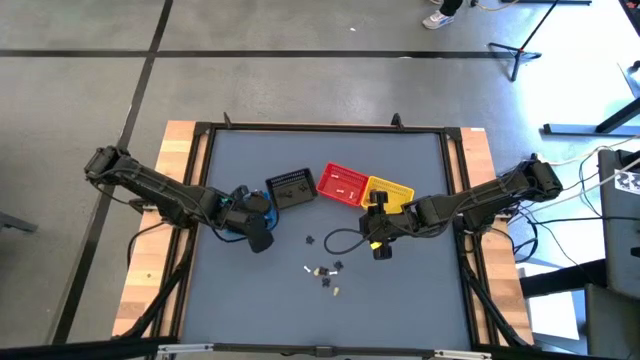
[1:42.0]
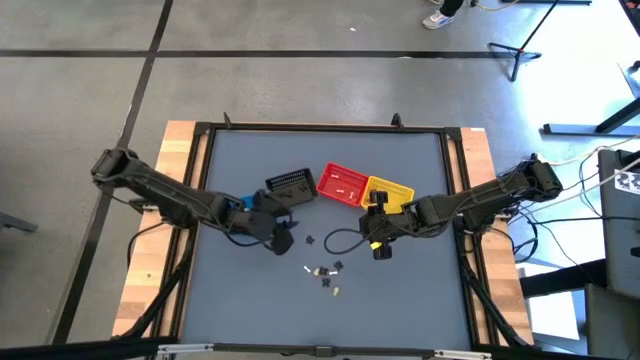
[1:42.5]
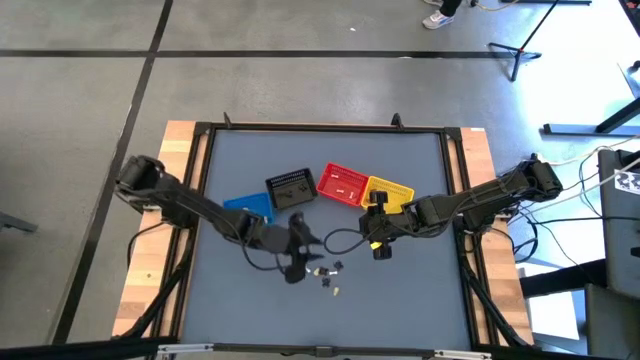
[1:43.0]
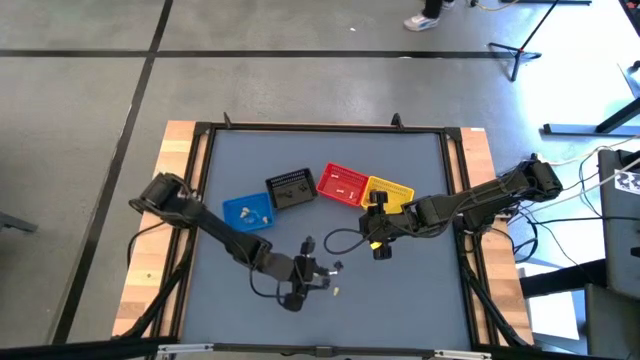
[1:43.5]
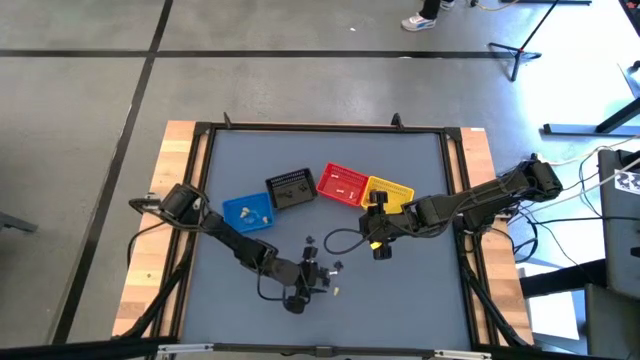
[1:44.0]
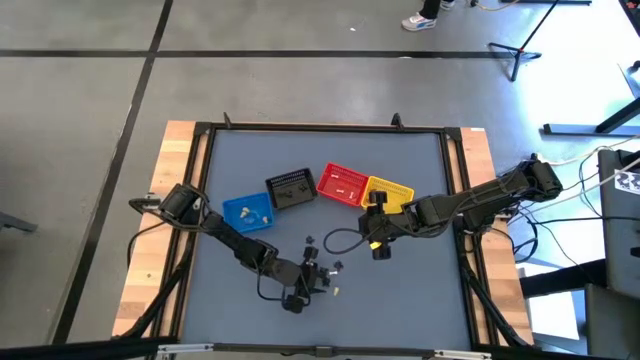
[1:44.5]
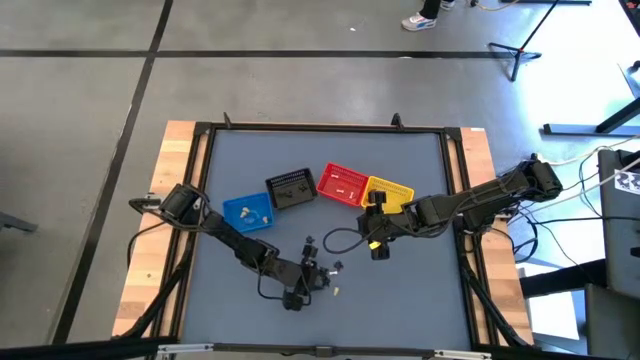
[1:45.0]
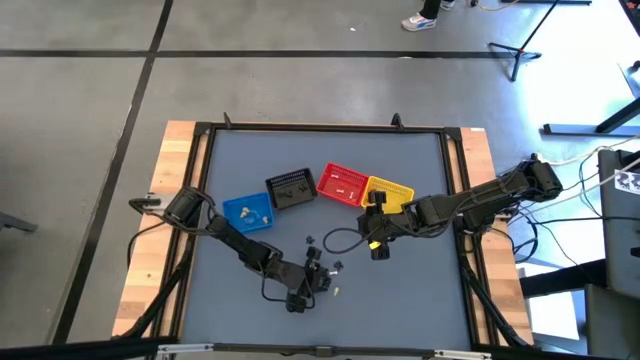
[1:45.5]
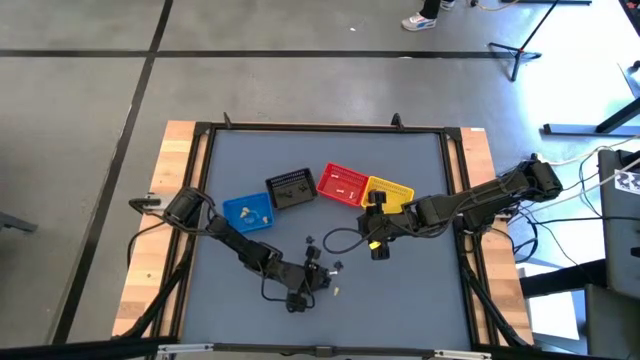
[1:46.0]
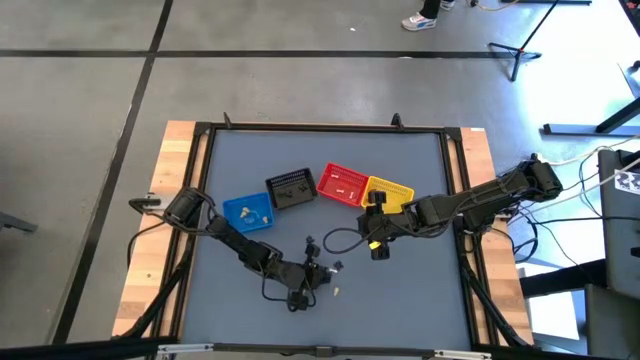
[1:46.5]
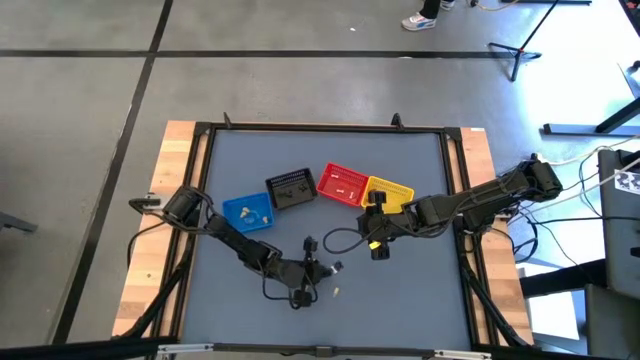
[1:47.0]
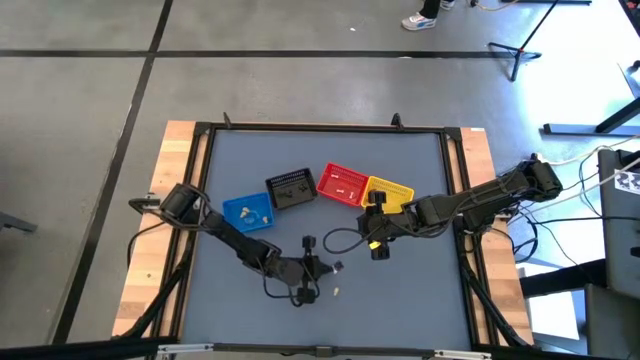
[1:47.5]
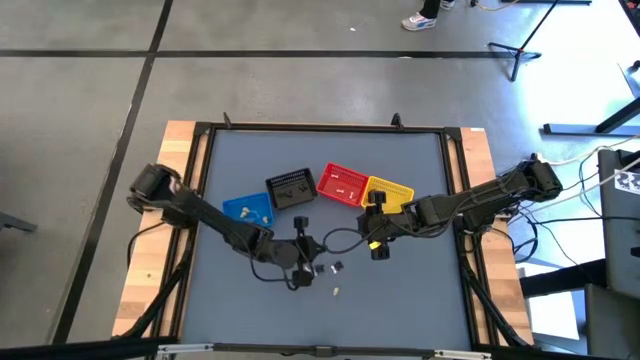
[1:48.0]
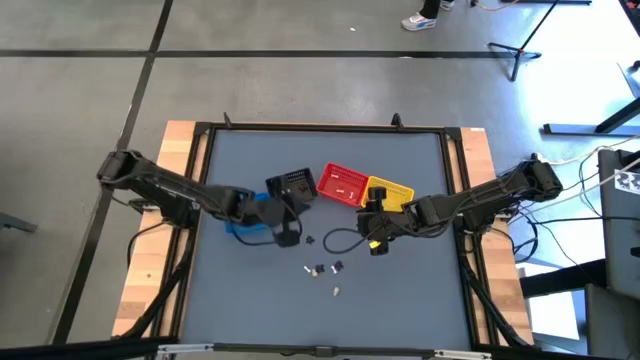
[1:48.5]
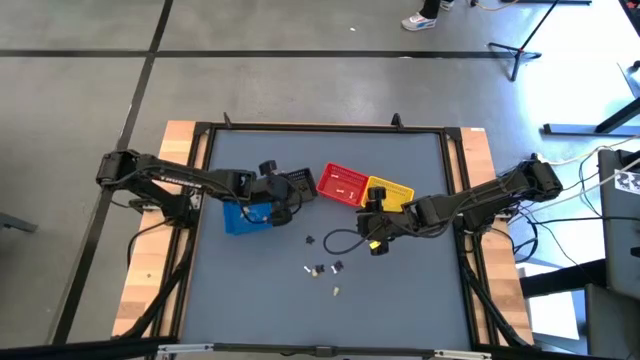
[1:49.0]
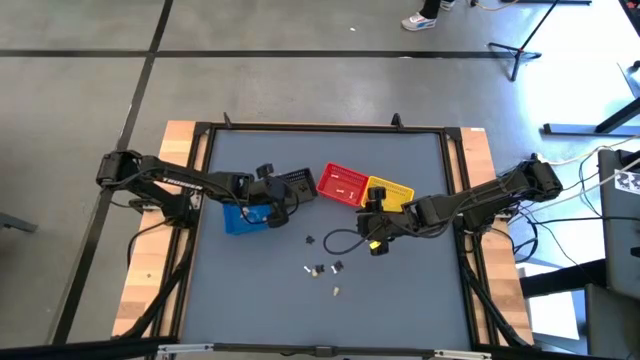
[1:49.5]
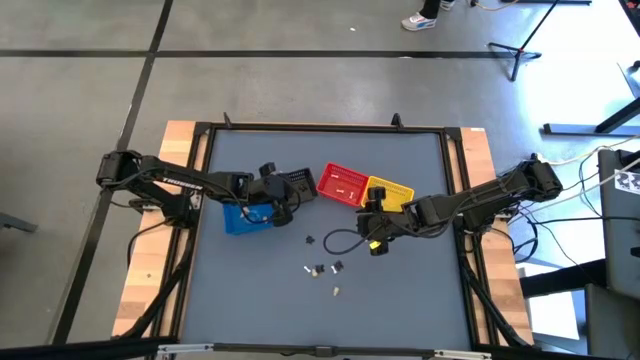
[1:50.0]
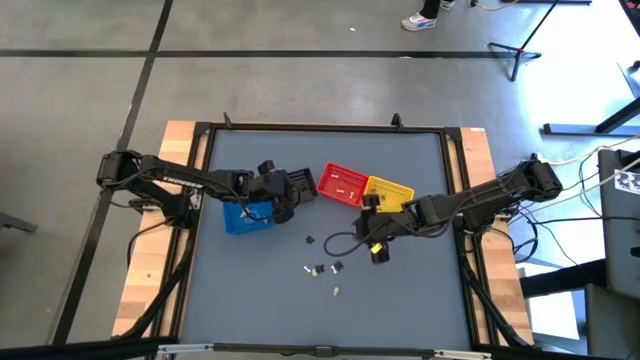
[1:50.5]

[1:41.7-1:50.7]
Task: Sort Halloween decoration
Put the black spider toy into the black bin

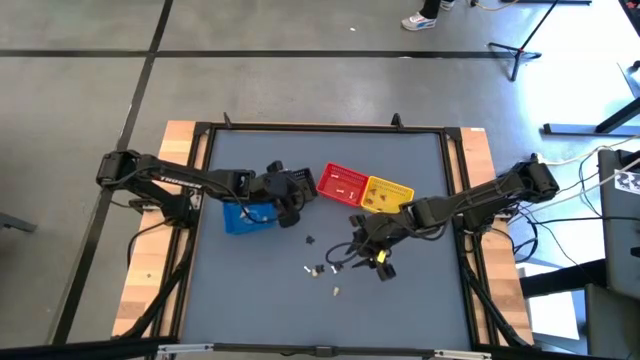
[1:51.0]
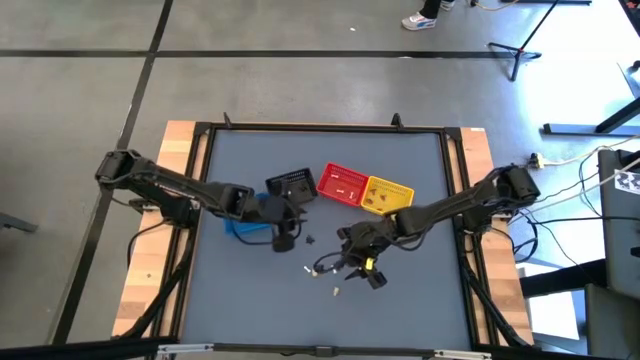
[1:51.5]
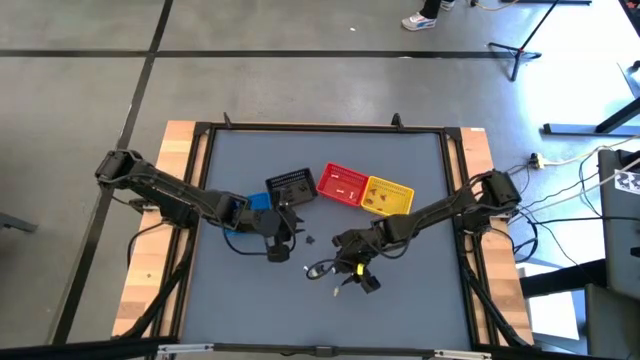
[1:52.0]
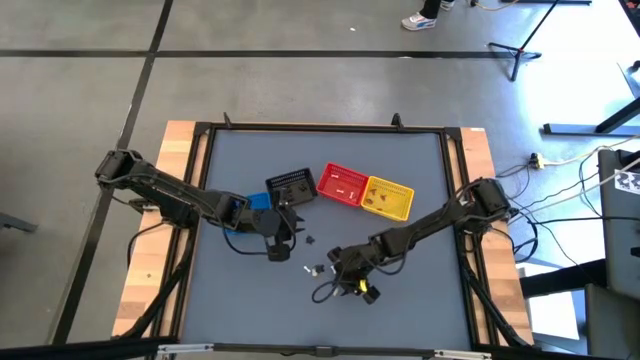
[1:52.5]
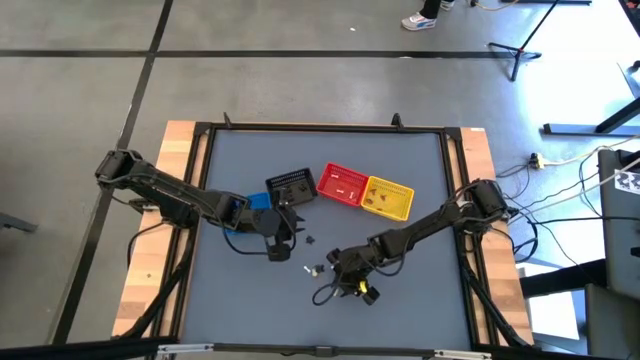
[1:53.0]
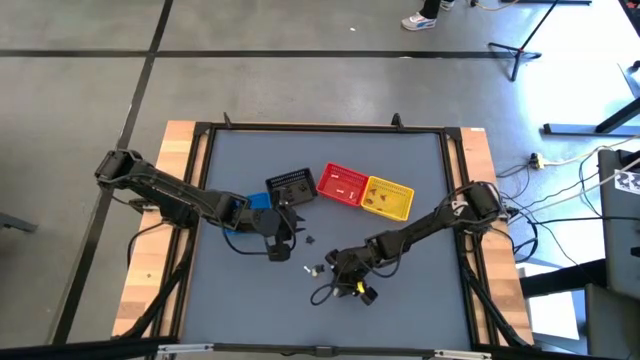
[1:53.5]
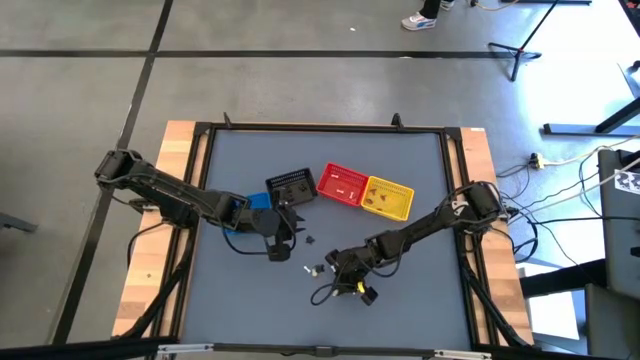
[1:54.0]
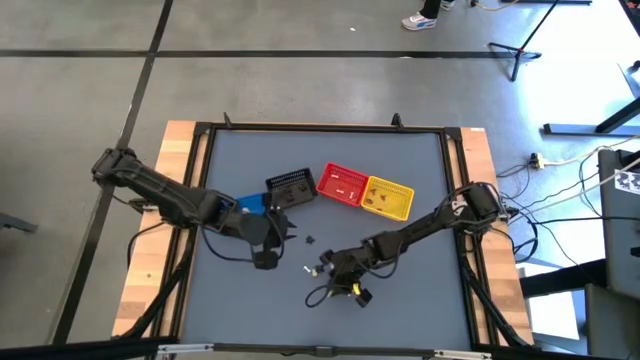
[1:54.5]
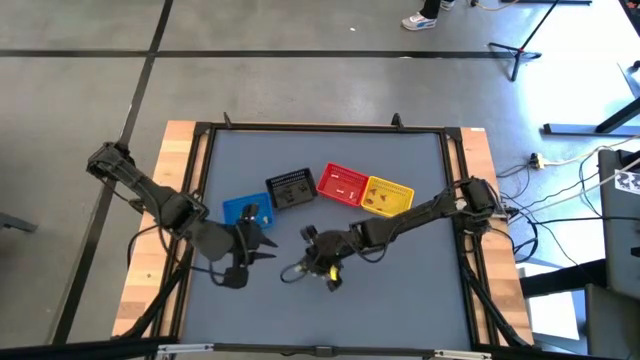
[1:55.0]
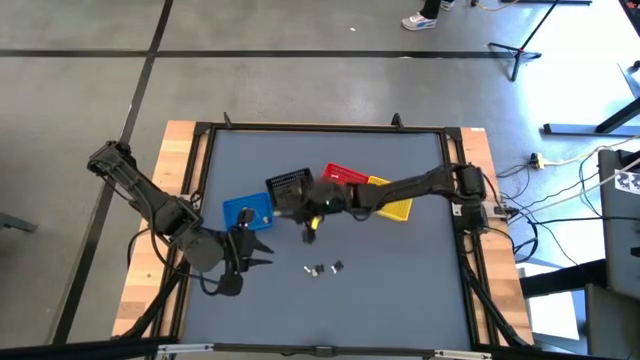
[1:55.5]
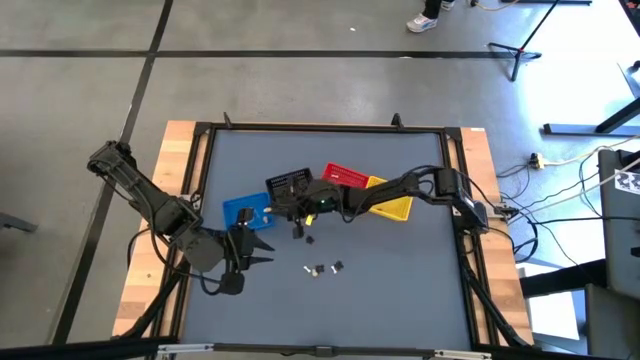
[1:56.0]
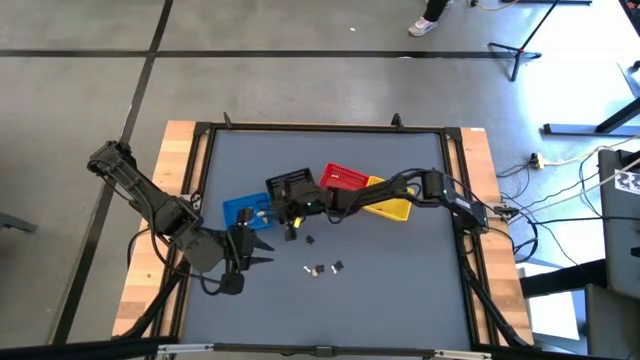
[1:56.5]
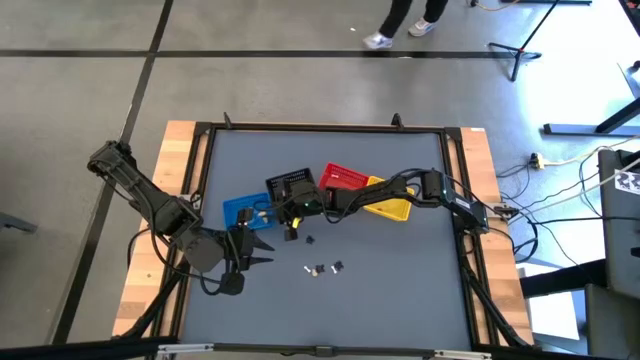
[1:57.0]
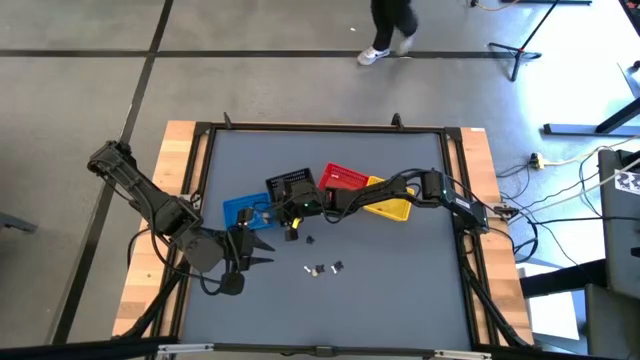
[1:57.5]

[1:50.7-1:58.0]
Put the yellow skull toy into the blue bin
